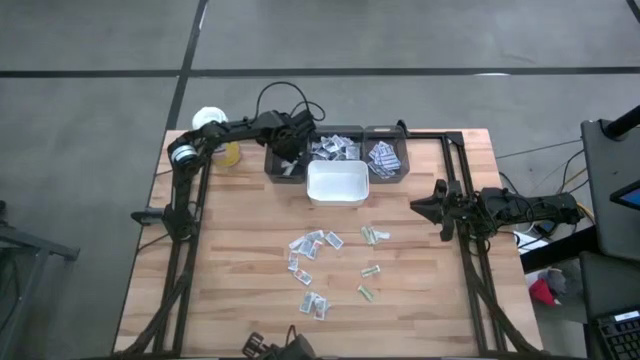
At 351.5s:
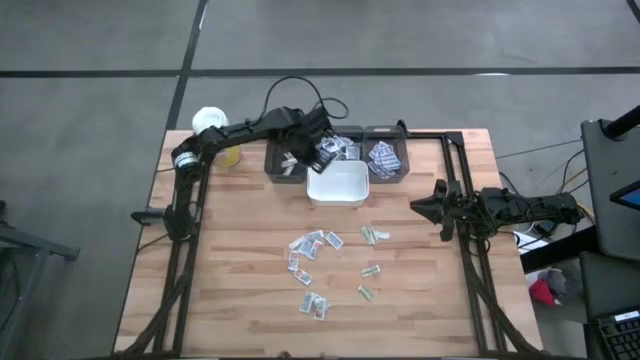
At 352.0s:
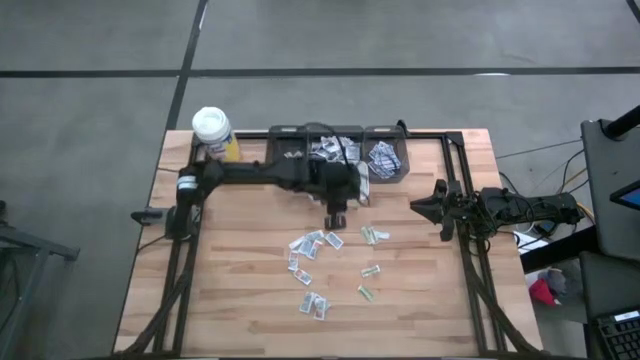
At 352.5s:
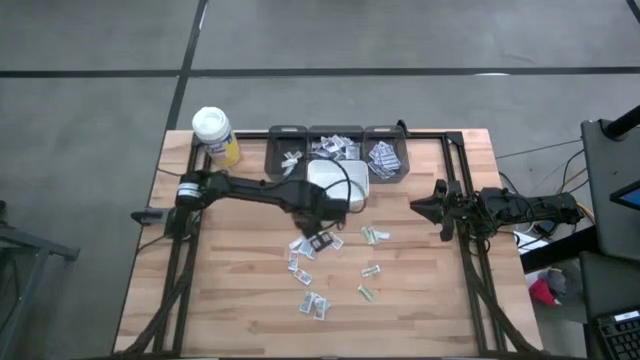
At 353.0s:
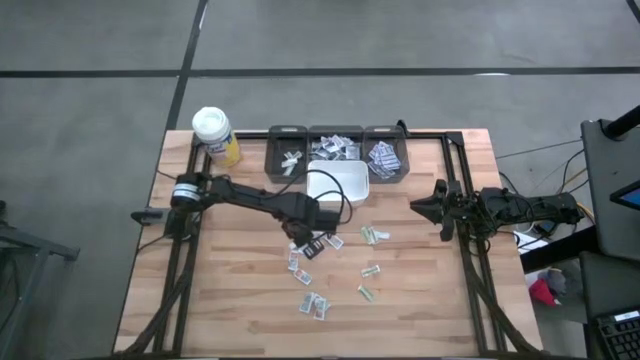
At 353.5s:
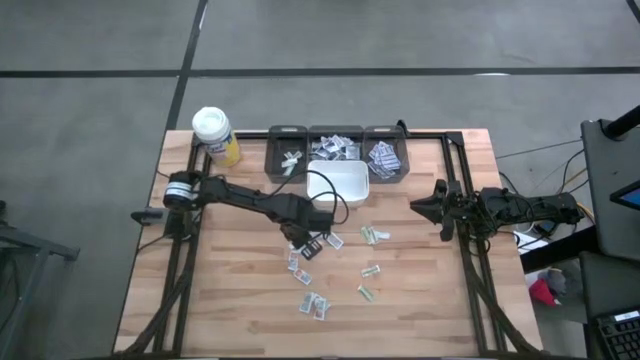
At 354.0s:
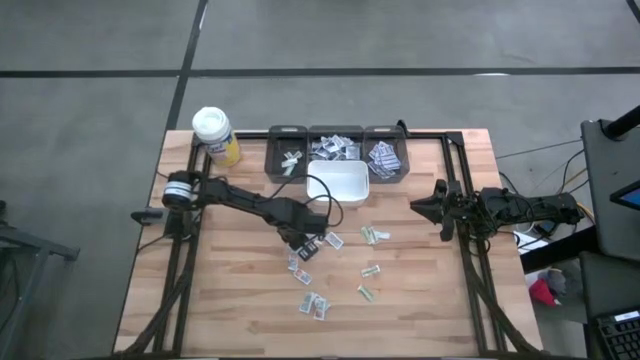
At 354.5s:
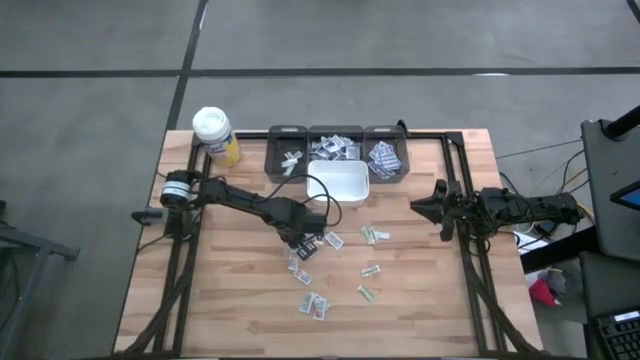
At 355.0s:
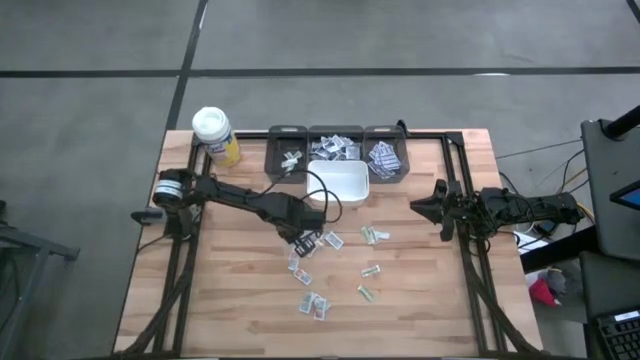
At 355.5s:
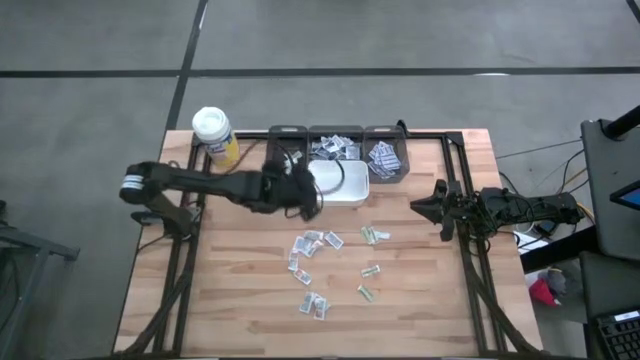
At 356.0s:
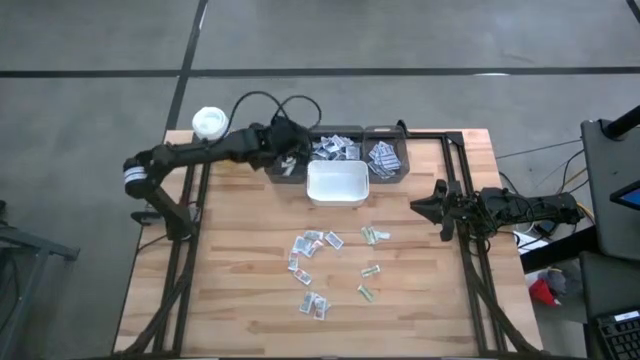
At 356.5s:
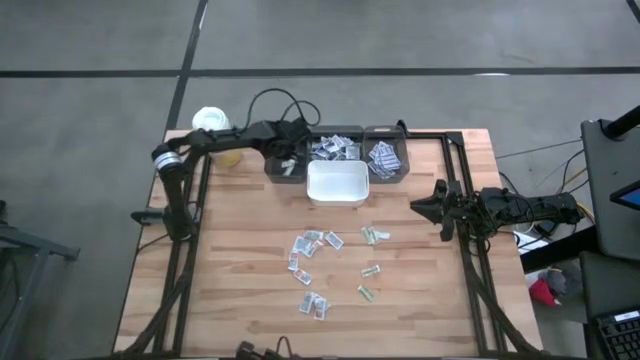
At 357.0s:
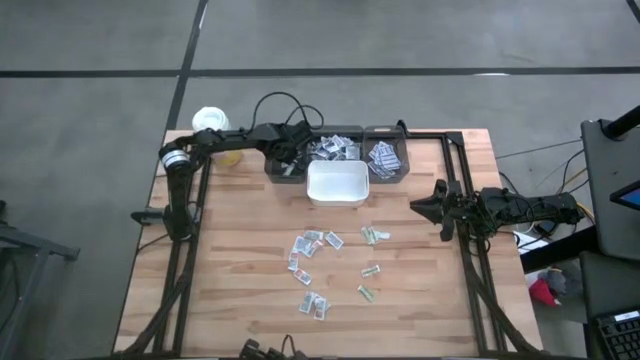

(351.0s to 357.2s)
Task: Pick & Place First Aid Supplies
Put the green bandage pack into the left black bin

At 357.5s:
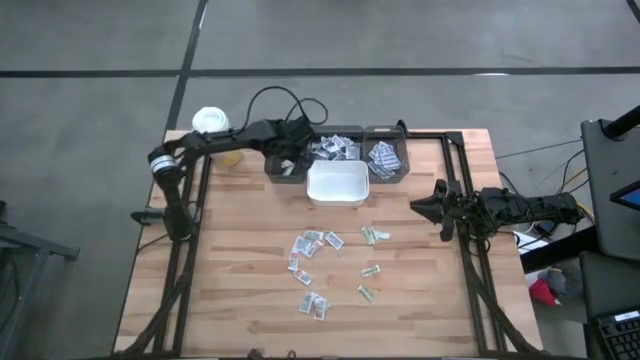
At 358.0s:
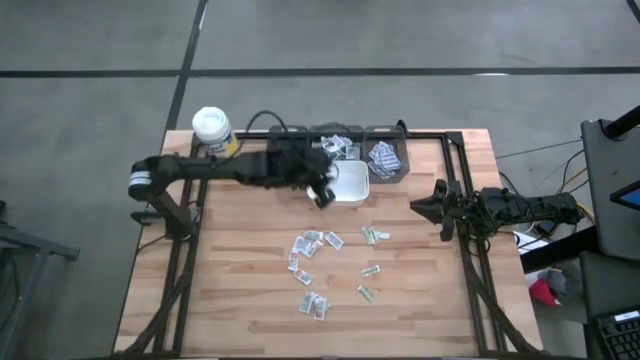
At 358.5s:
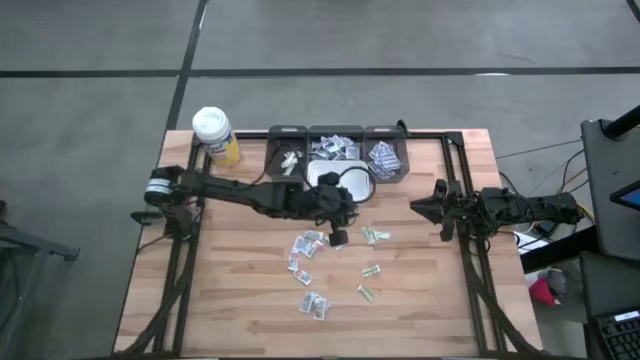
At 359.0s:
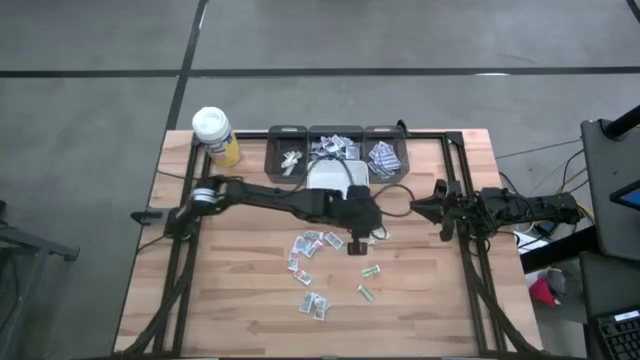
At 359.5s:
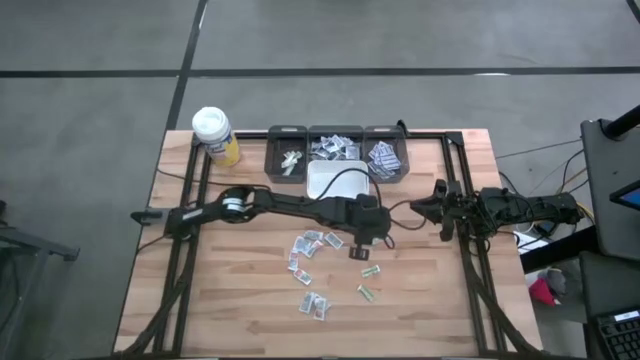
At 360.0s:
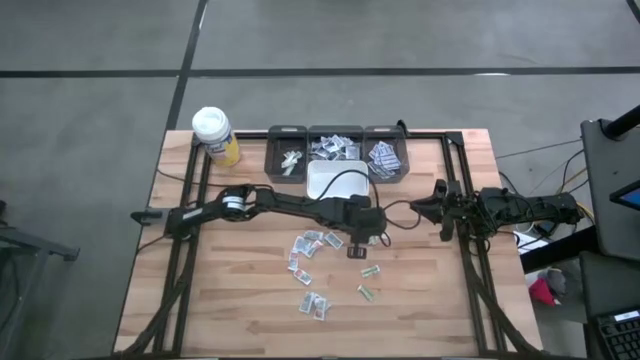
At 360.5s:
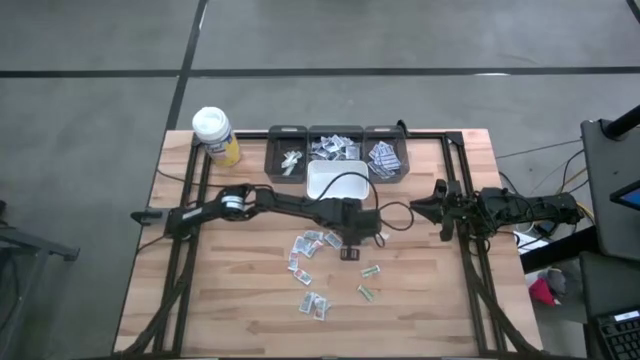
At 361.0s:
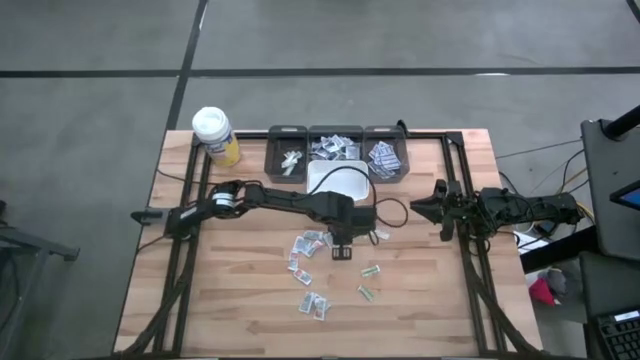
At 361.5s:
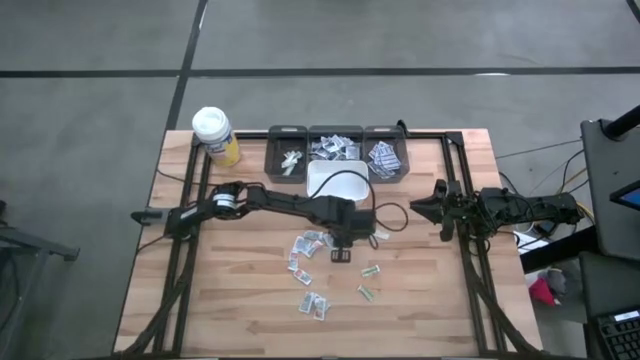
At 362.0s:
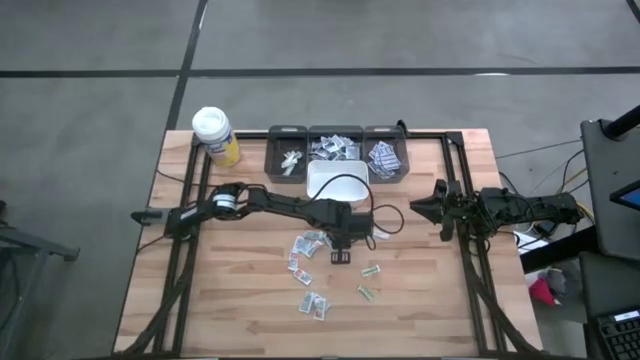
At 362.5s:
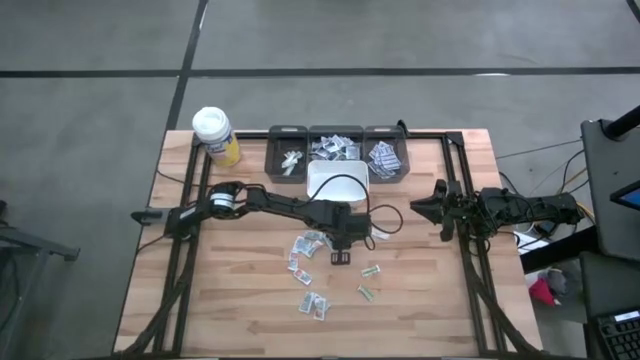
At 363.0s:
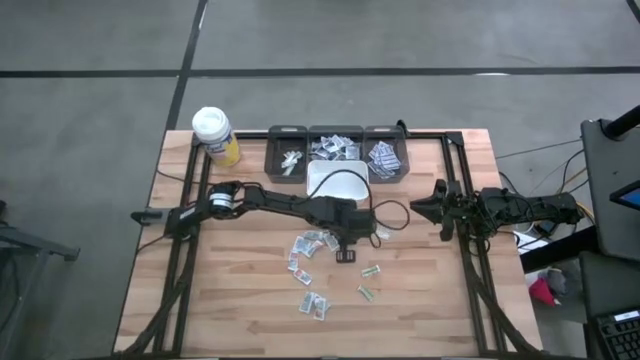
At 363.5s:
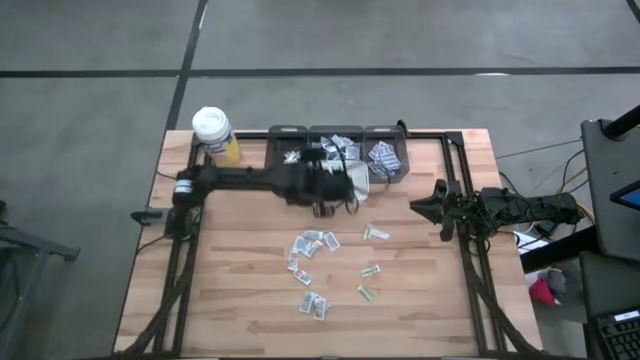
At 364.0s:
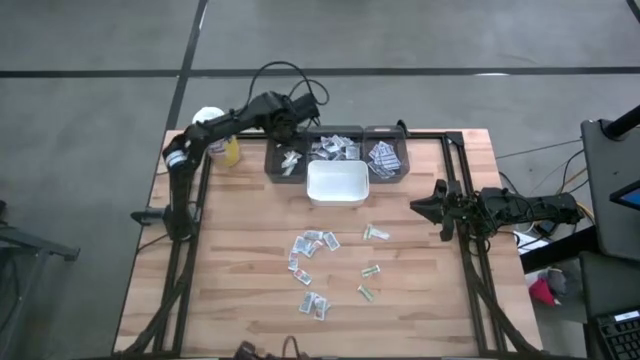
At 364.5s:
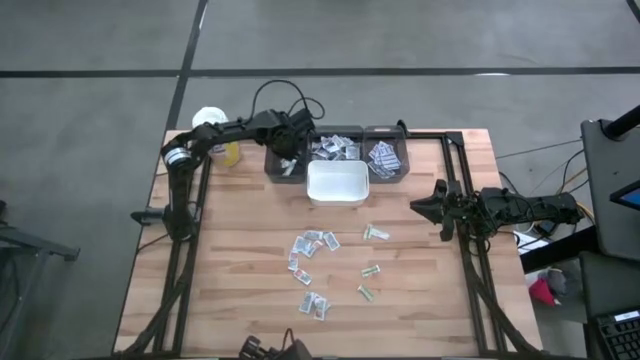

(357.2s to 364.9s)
Put the green bandage pack into the left black bin

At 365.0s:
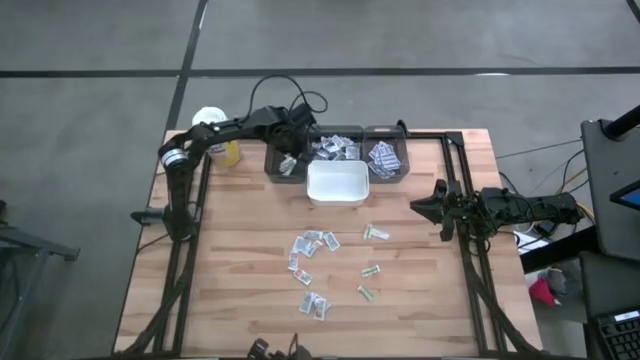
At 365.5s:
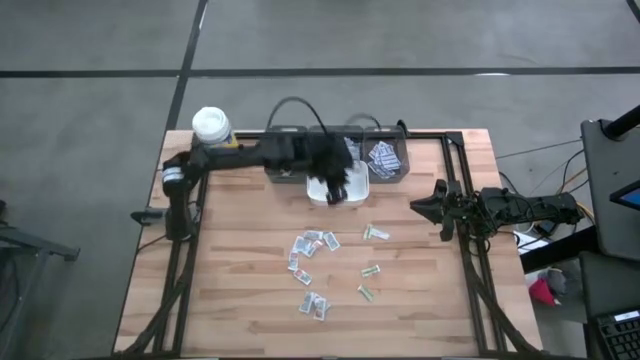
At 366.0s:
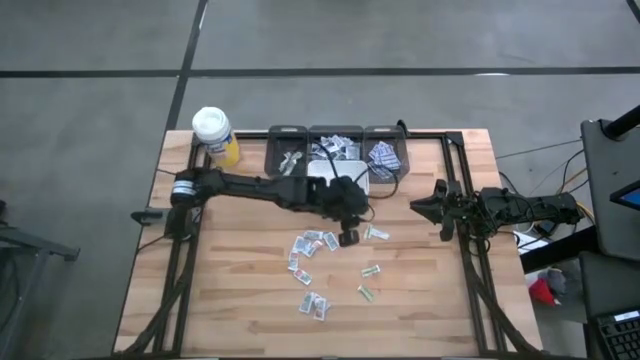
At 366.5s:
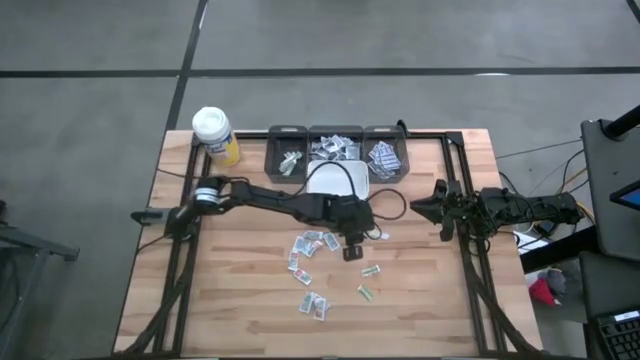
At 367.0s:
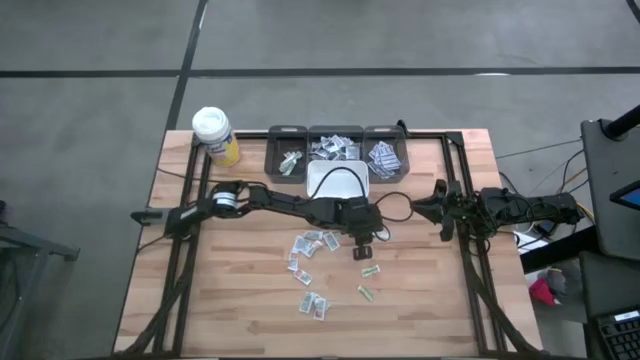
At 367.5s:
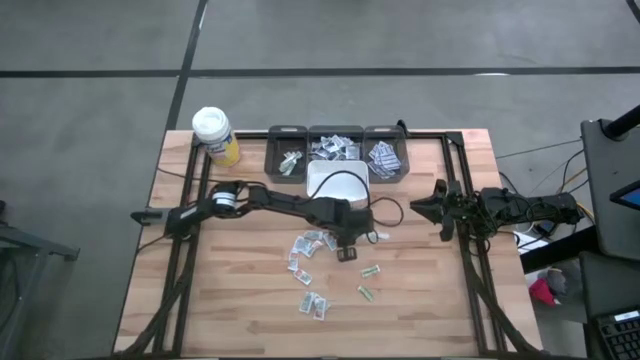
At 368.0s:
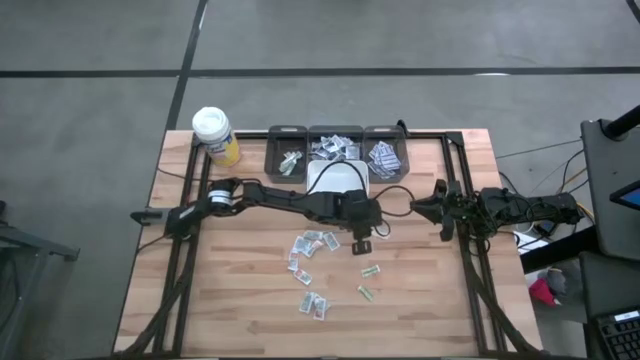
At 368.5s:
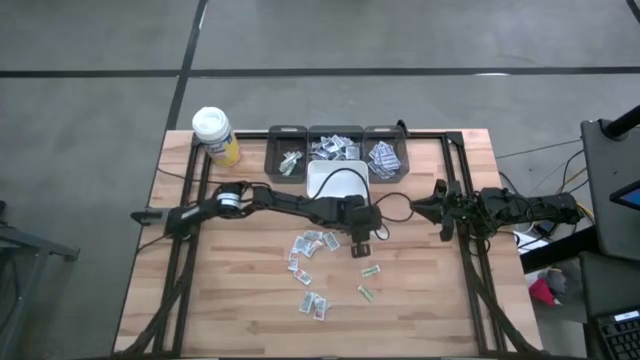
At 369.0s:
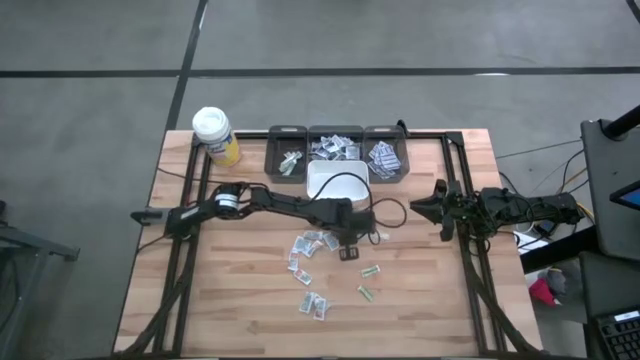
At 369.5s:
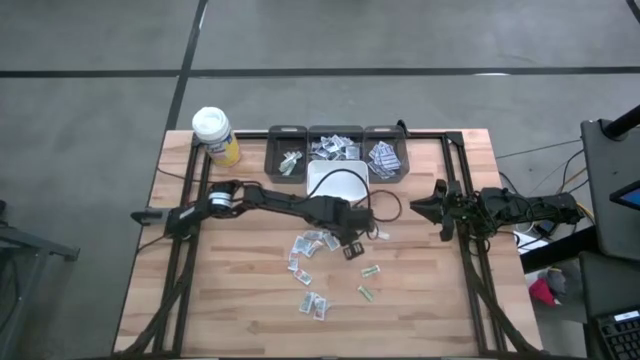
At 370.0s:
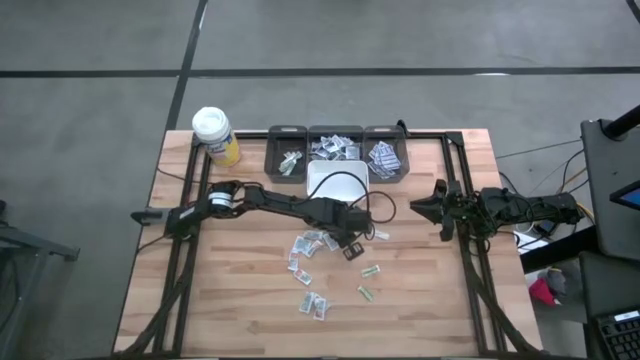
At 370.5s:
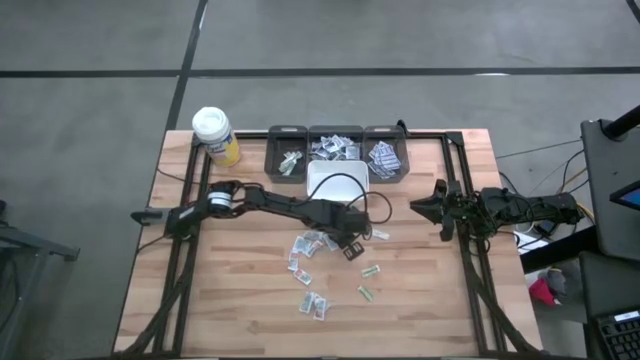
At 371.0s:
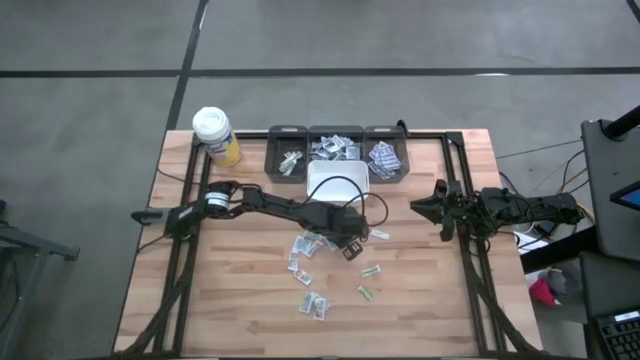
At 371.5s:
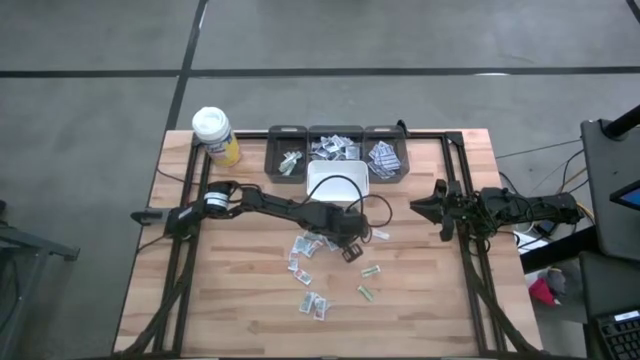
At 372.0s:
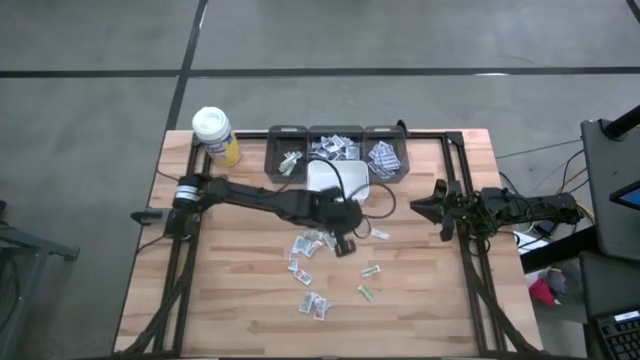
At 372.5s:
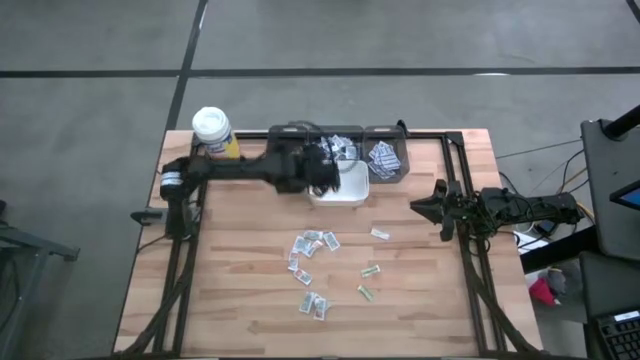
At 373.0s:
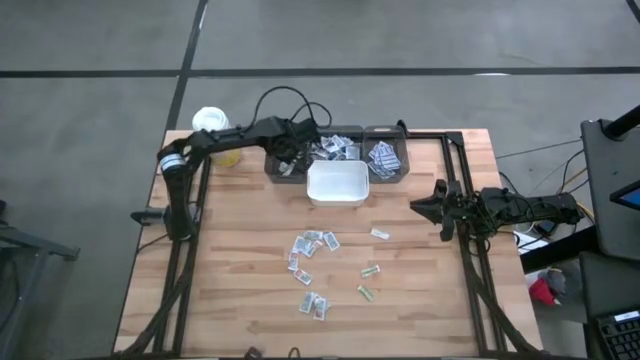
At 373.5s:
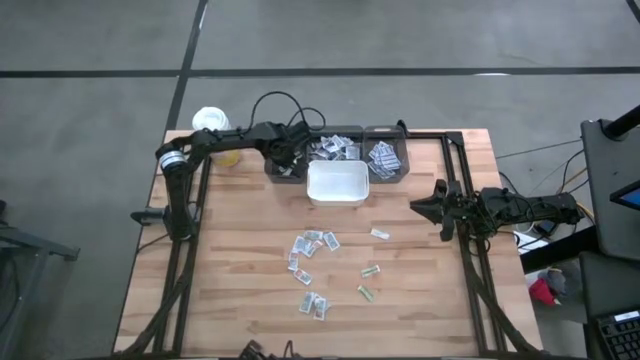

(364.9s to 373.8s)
Put the green bandage pack into the left black bin
